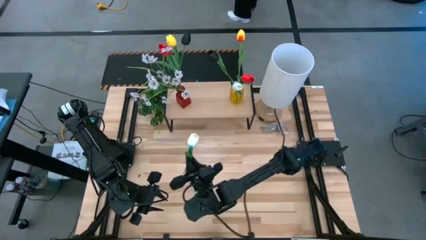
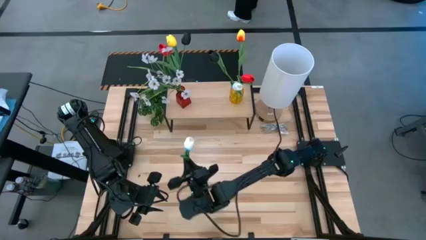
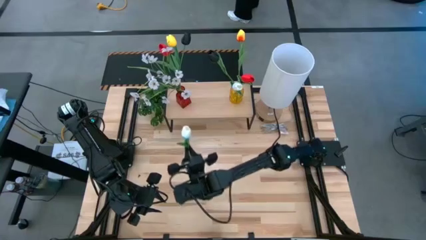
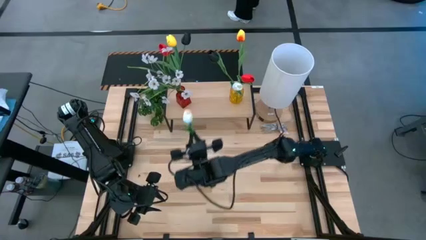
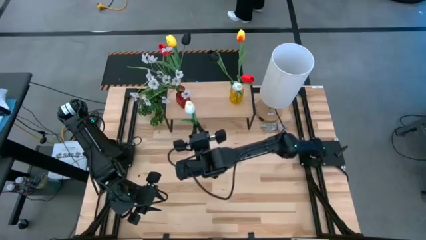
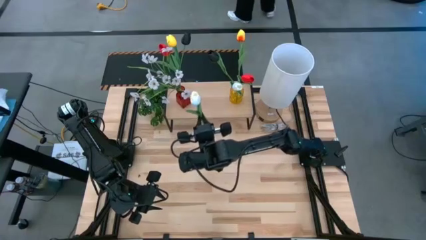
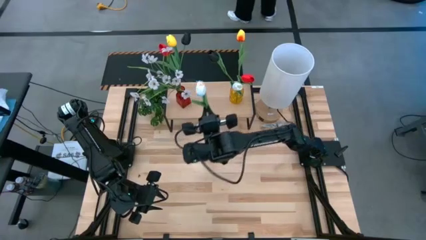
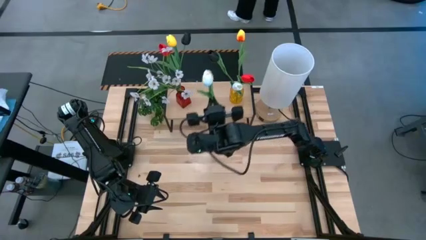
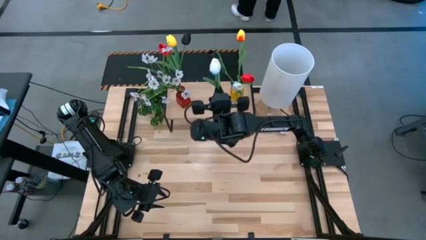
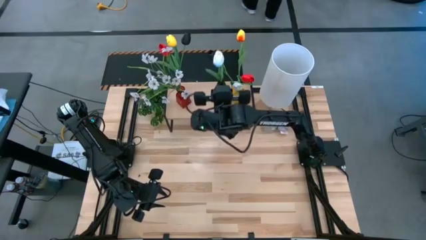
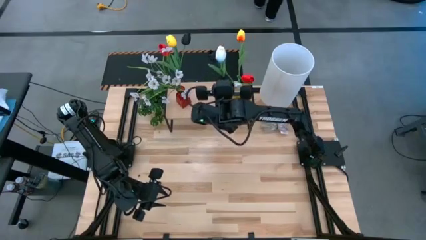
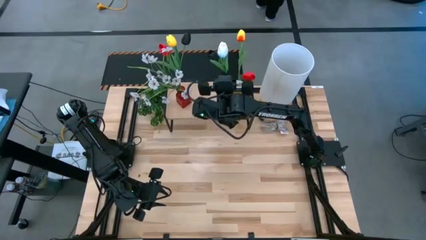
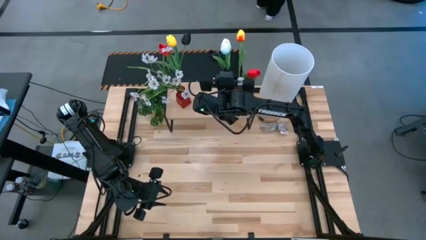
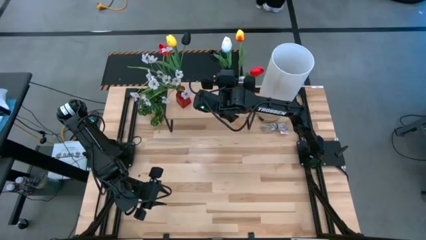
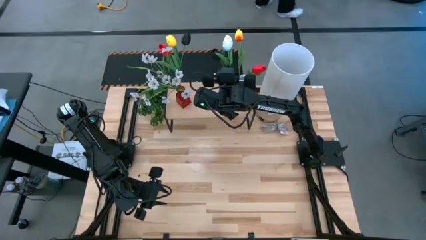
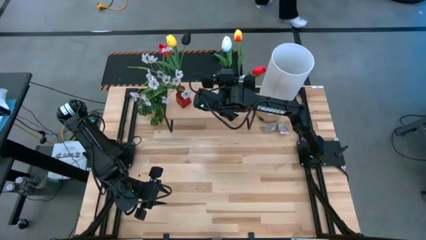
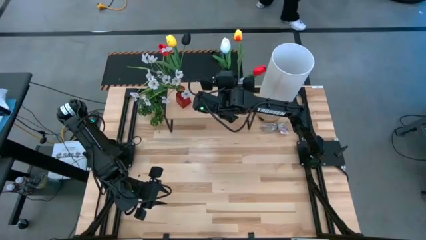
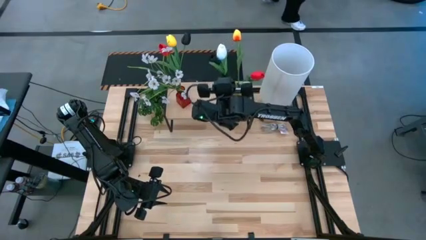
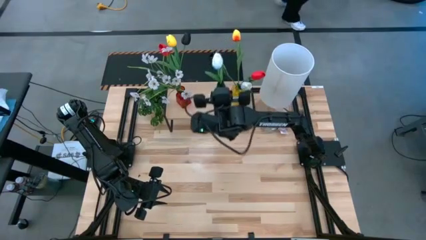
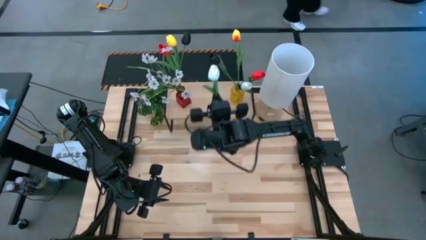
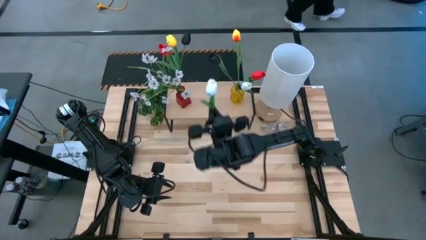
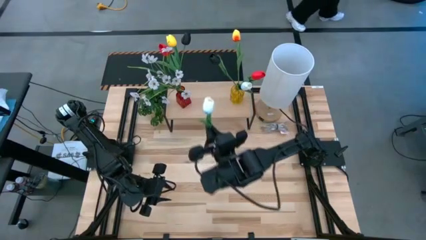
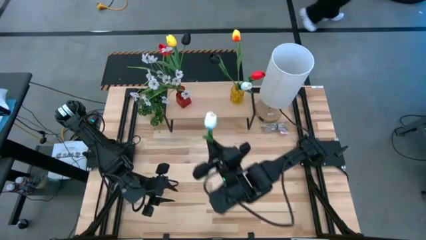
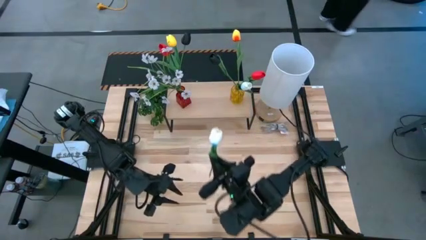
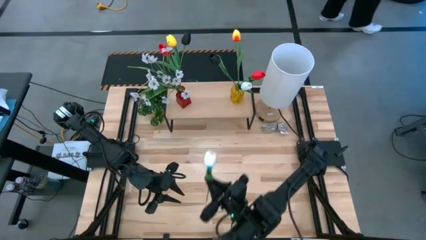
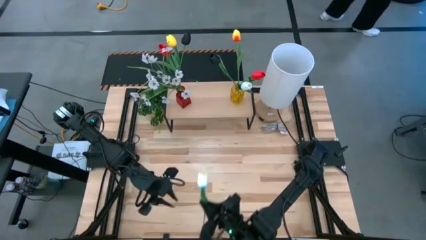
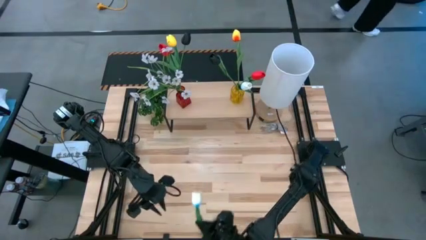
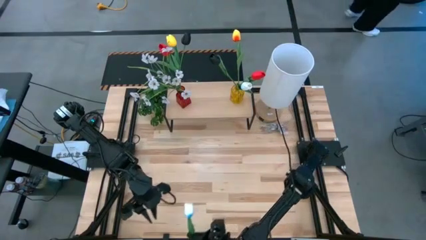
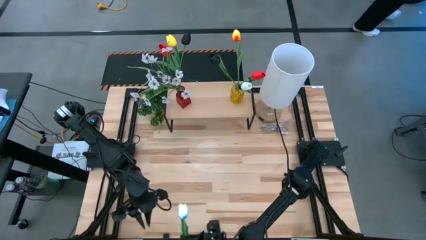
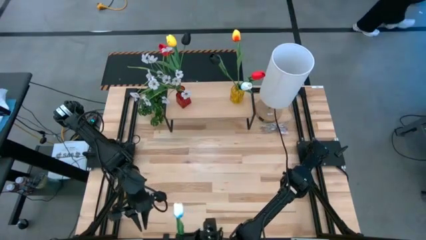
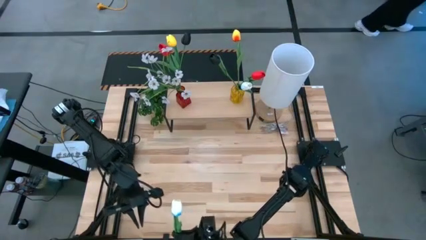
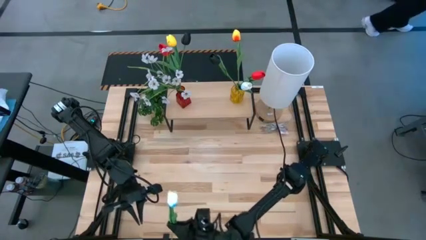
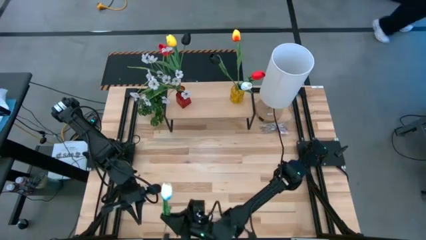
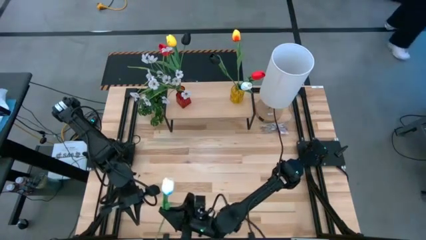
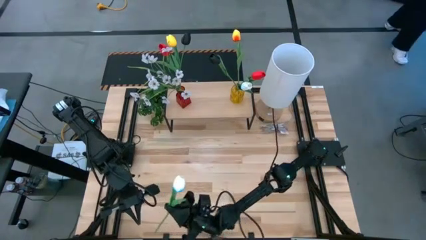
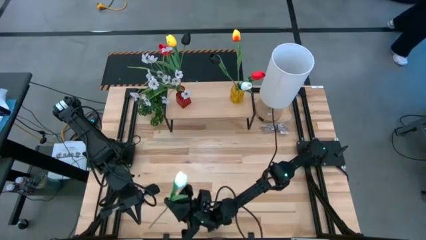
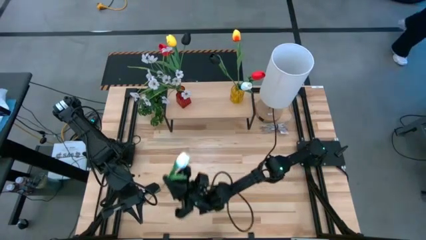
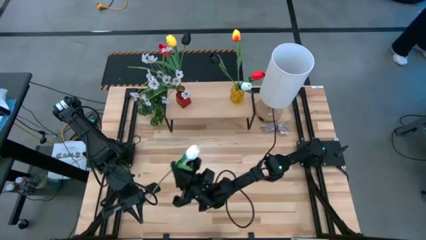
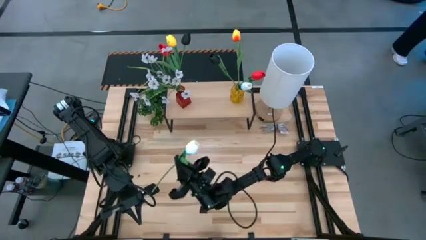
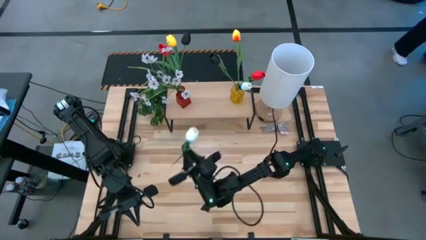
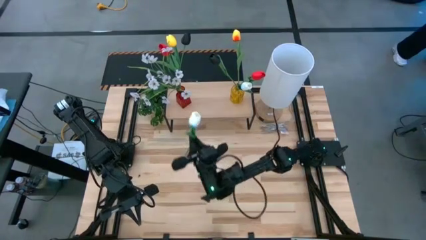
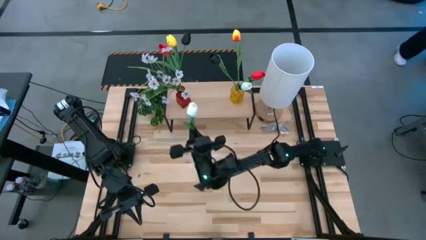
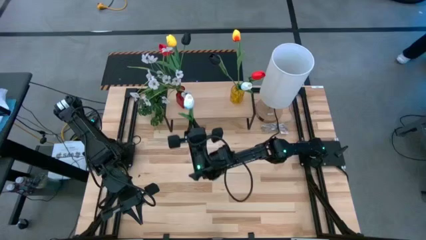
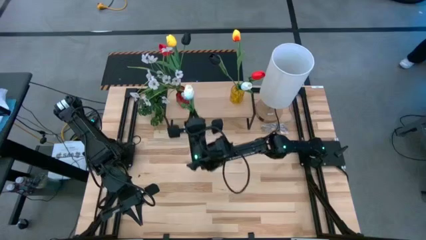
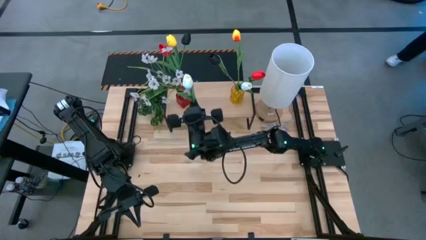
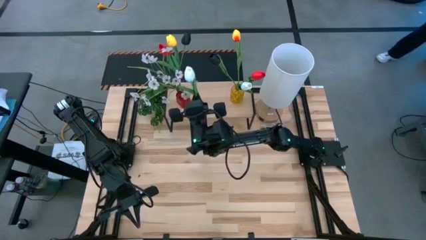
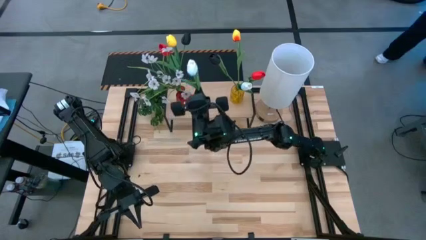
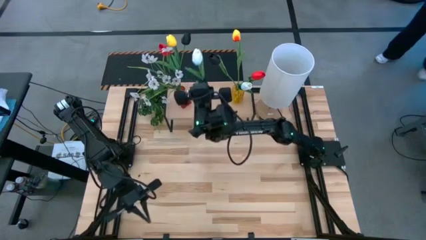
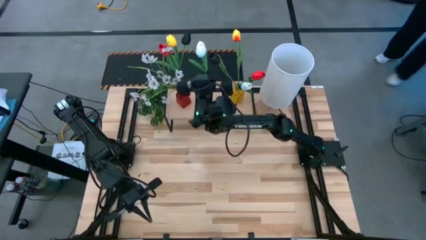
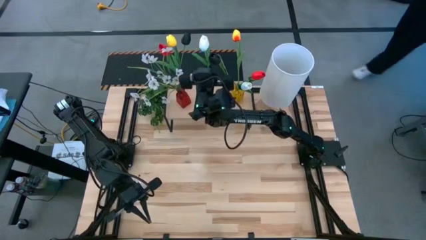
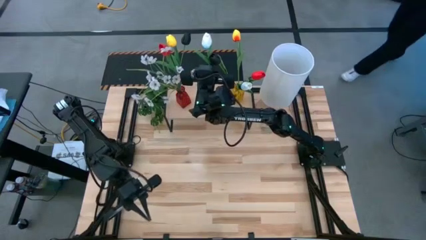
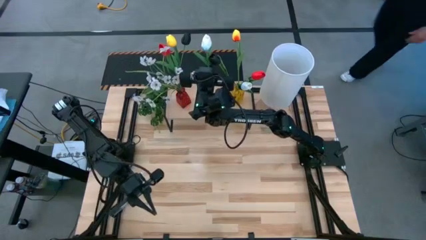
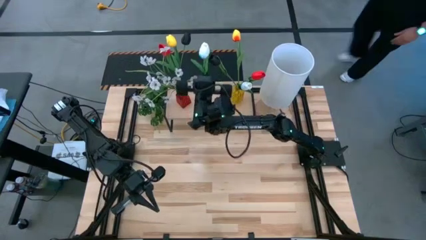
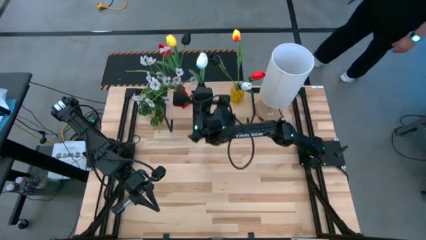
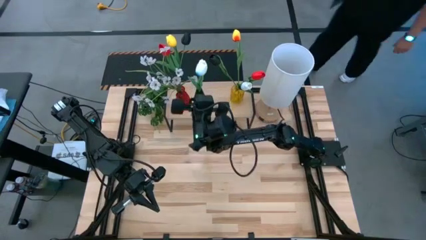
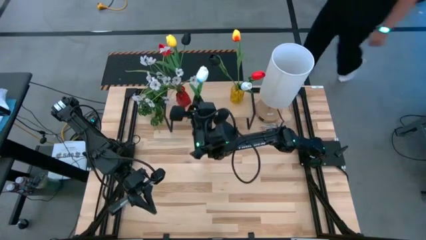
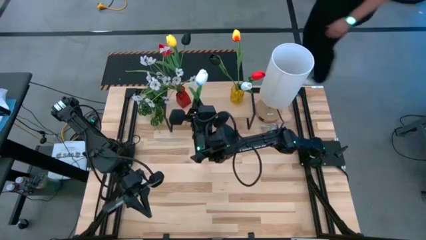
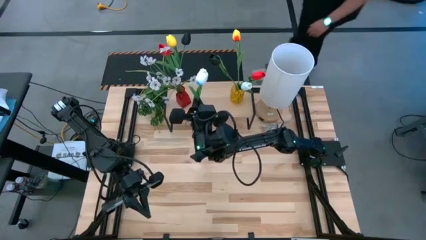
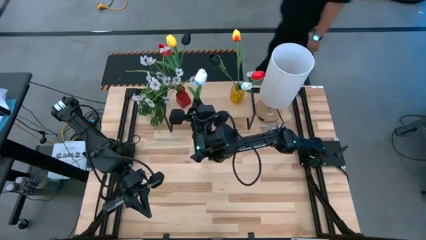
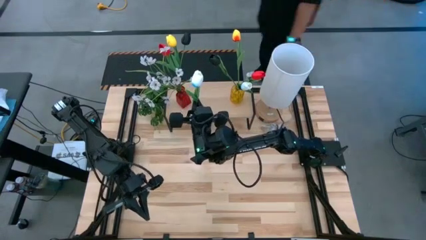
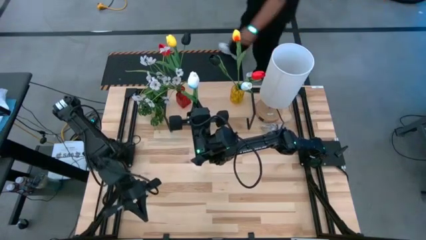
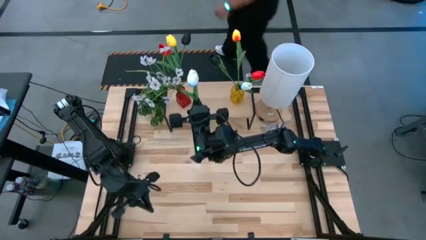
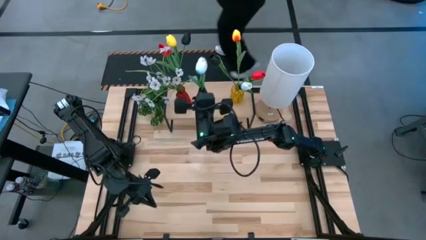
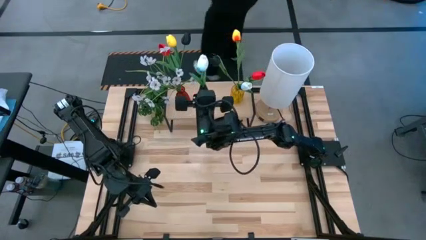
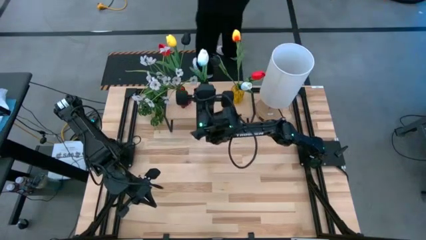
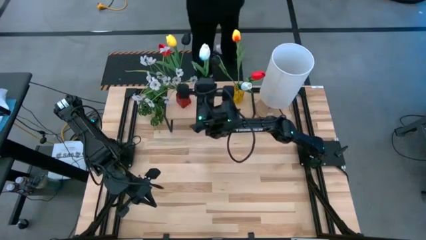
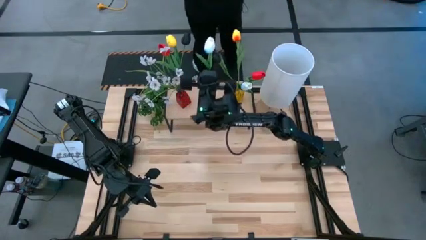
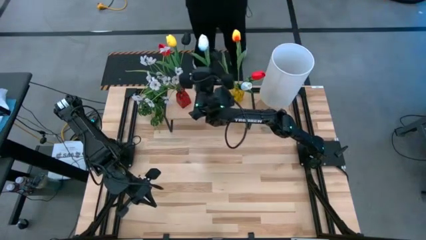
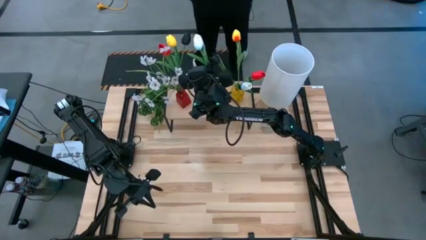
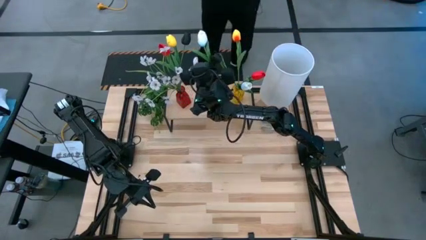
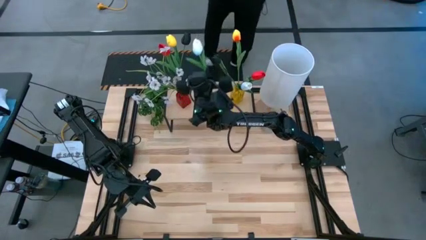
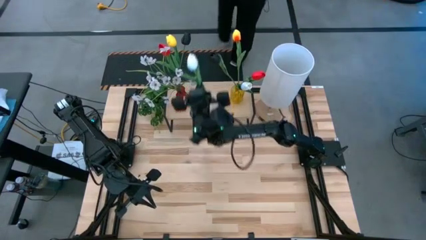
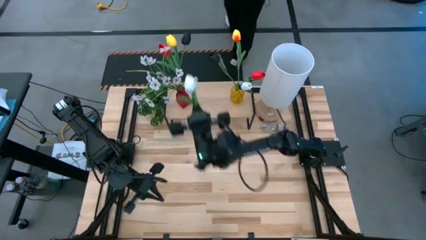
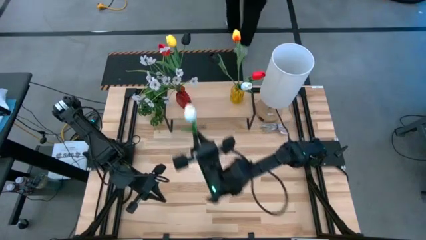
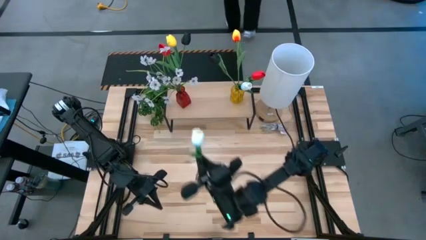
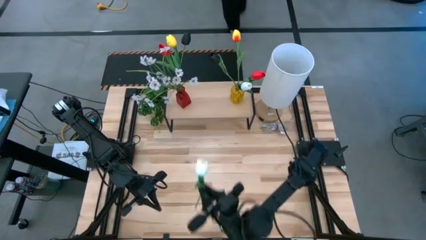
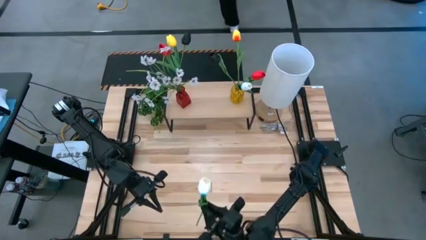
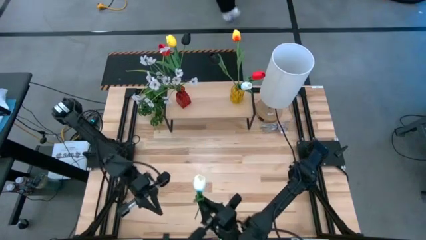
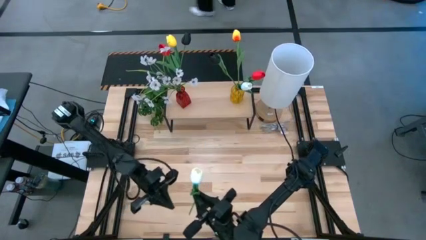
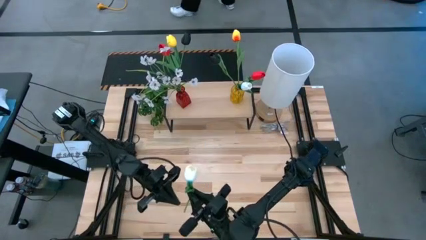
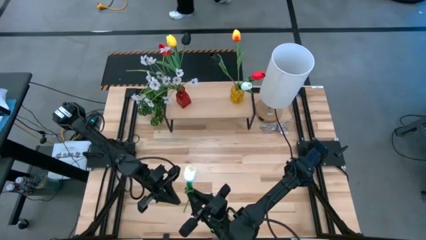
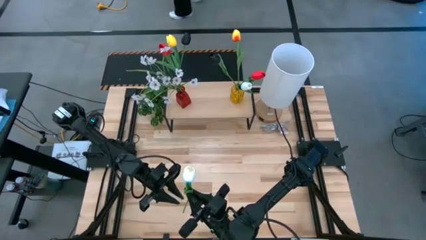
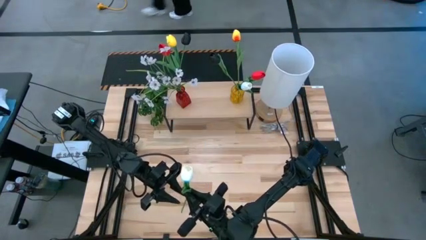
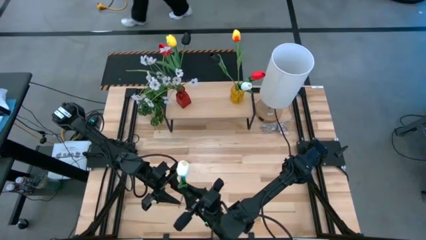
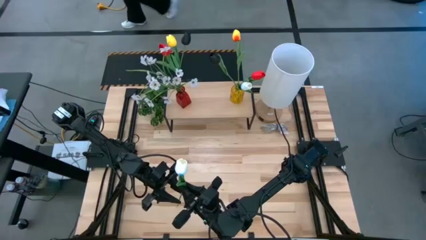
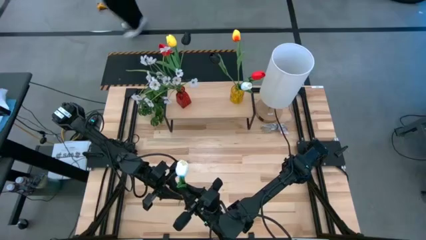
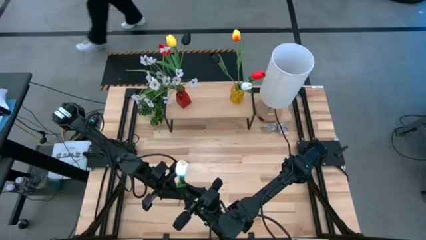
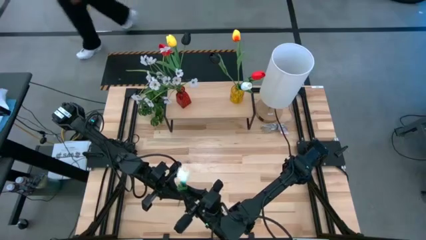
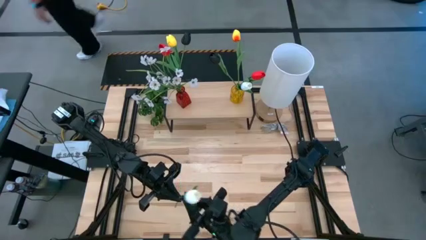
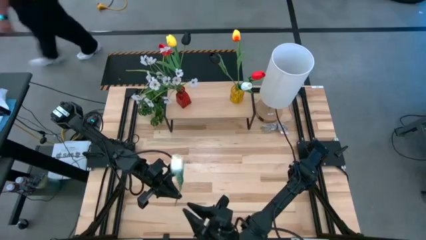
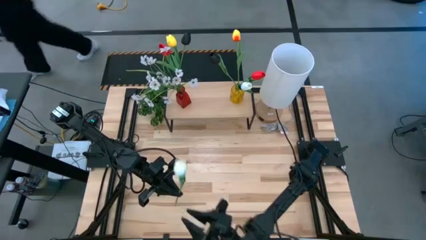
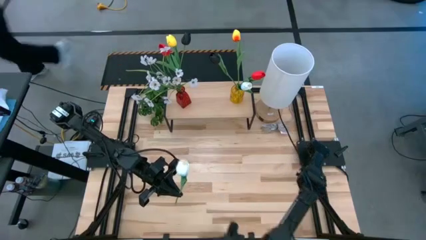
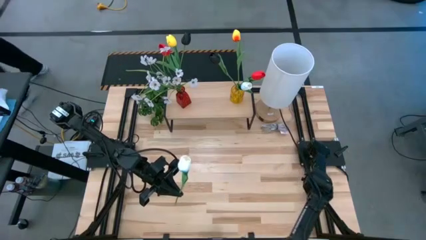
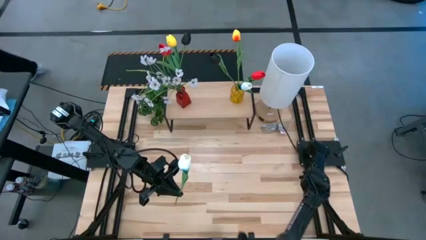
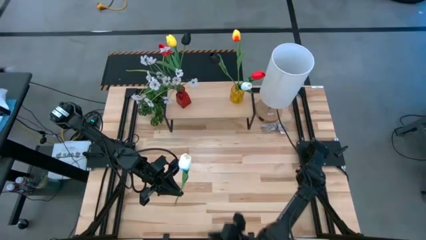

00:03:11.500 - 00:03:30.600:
Task: Pick and place flowers into a vace then onto a shelf
Put the white flower into the yellow vase on the shelf
